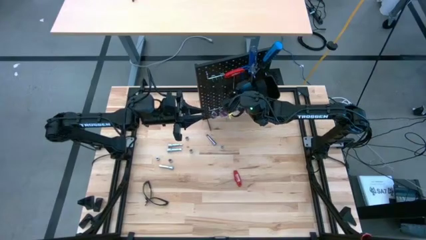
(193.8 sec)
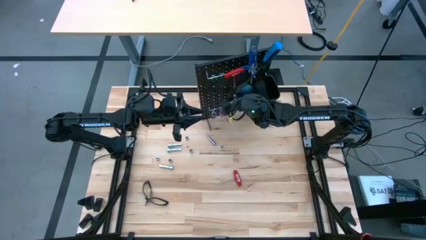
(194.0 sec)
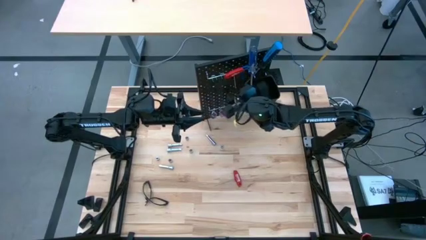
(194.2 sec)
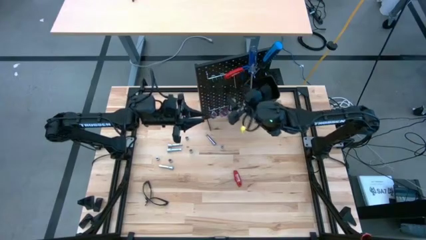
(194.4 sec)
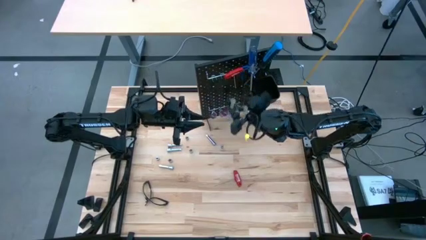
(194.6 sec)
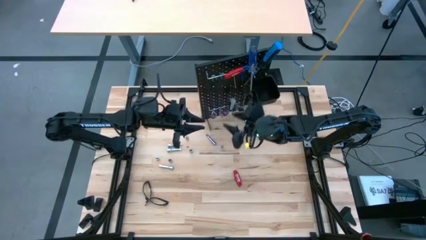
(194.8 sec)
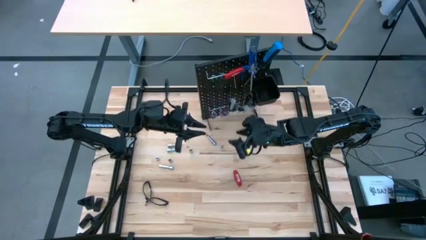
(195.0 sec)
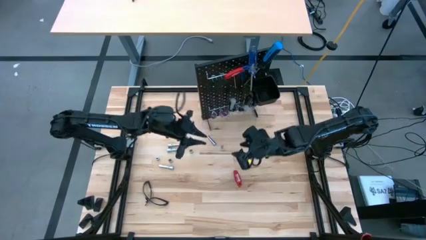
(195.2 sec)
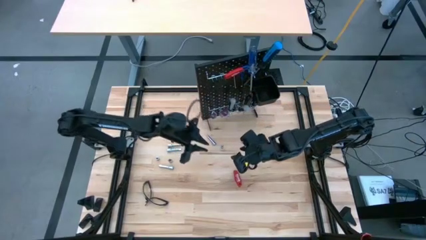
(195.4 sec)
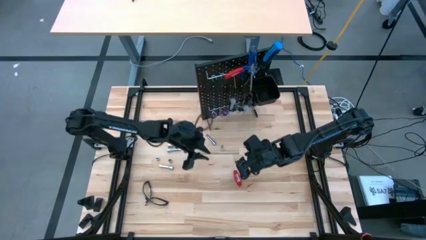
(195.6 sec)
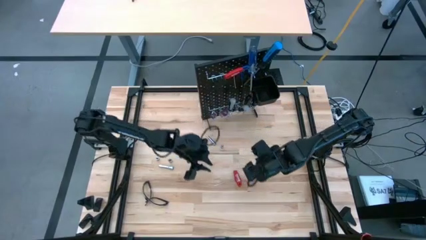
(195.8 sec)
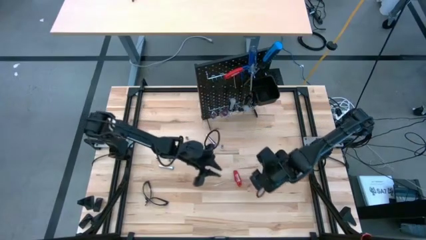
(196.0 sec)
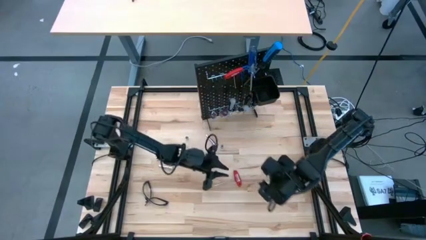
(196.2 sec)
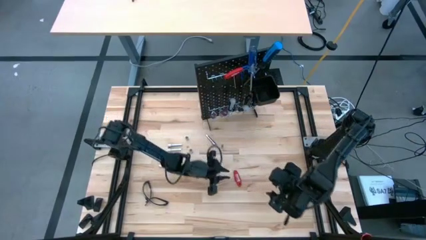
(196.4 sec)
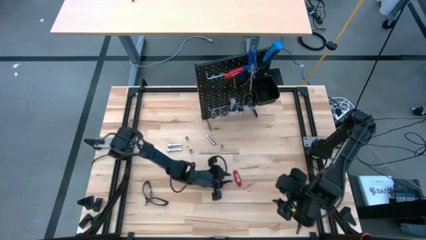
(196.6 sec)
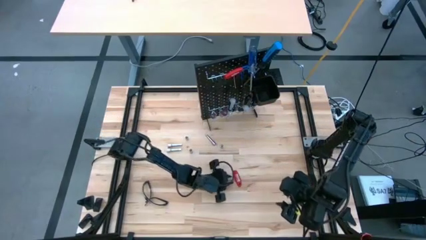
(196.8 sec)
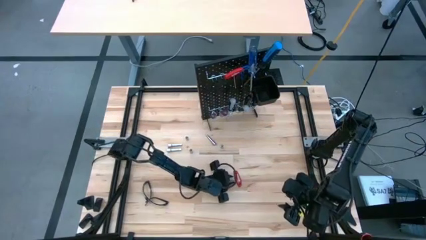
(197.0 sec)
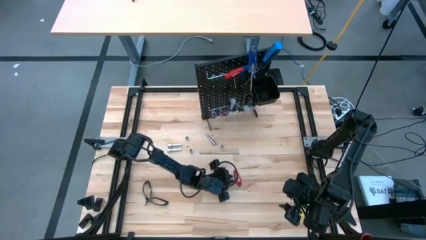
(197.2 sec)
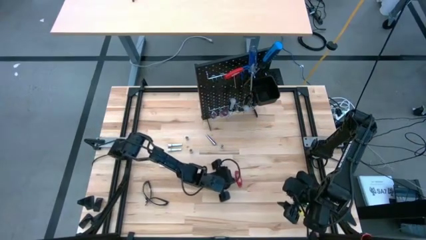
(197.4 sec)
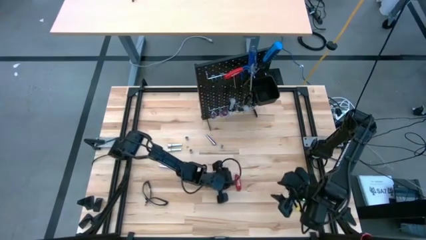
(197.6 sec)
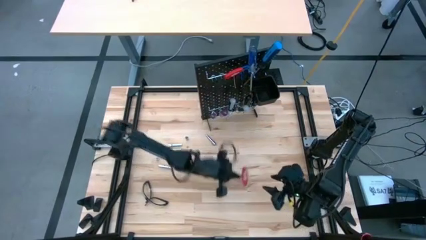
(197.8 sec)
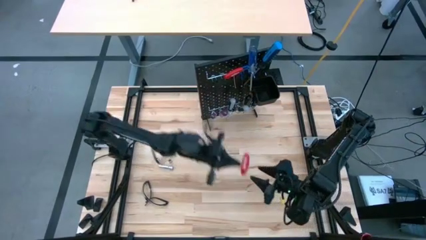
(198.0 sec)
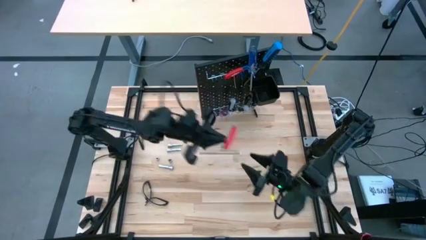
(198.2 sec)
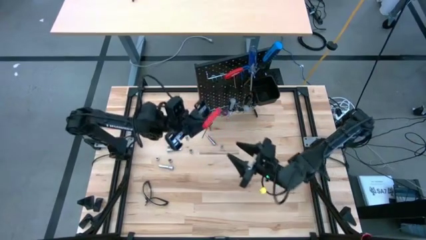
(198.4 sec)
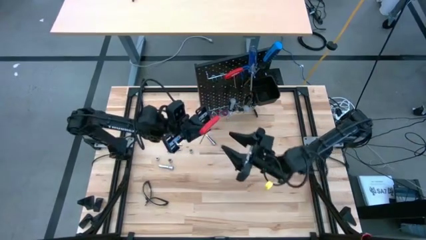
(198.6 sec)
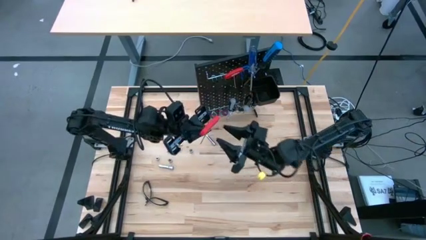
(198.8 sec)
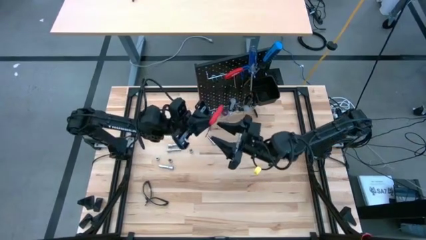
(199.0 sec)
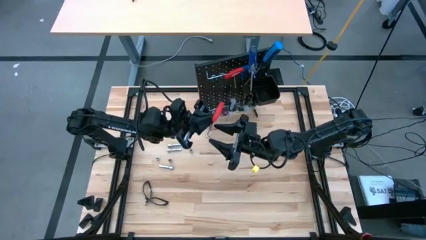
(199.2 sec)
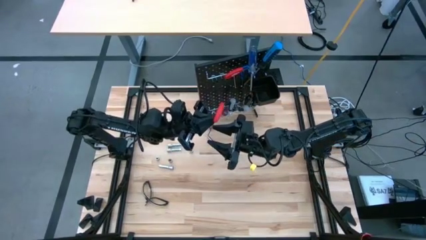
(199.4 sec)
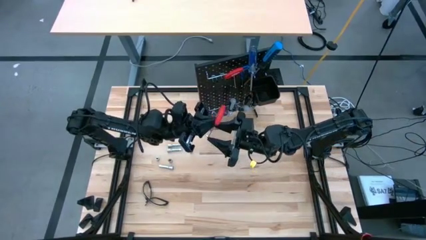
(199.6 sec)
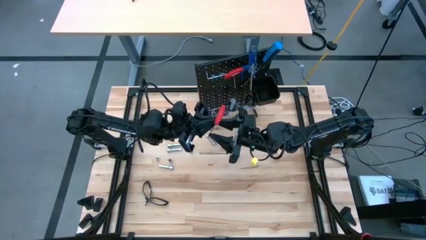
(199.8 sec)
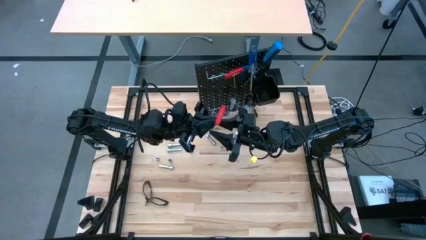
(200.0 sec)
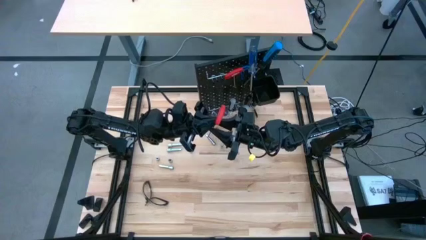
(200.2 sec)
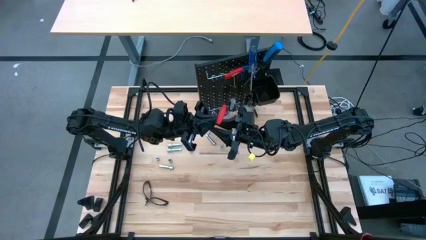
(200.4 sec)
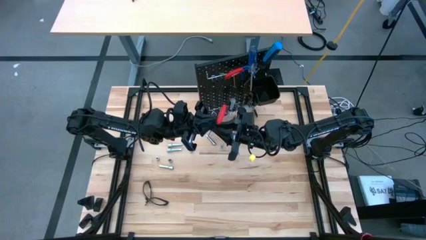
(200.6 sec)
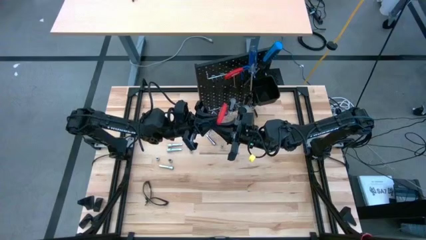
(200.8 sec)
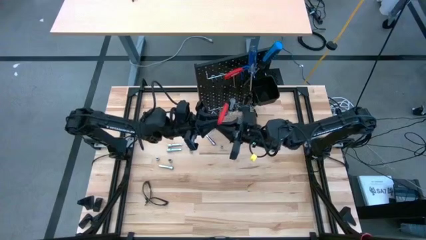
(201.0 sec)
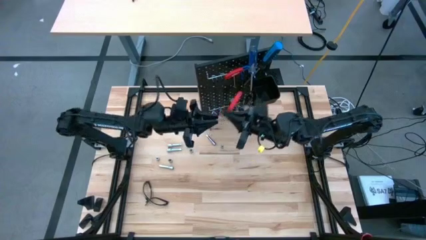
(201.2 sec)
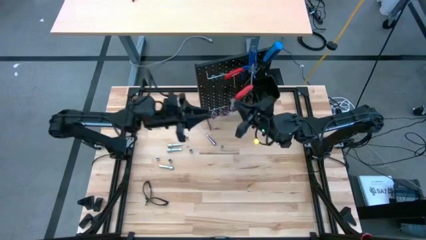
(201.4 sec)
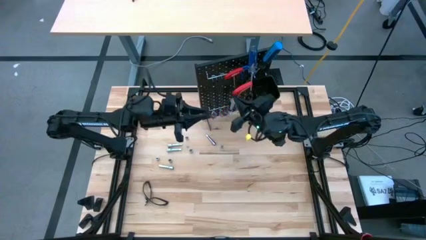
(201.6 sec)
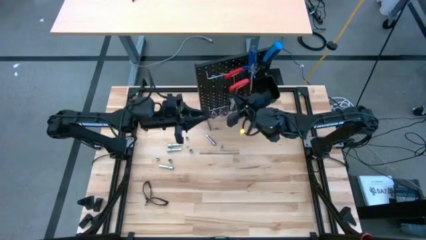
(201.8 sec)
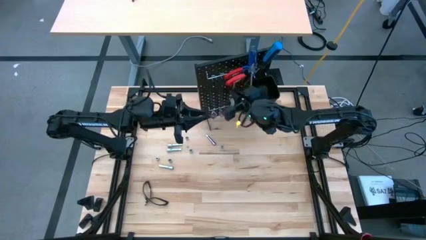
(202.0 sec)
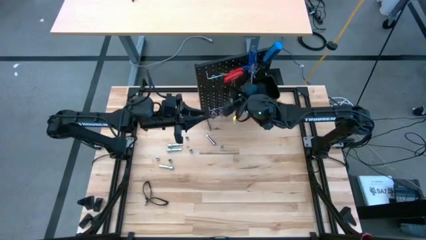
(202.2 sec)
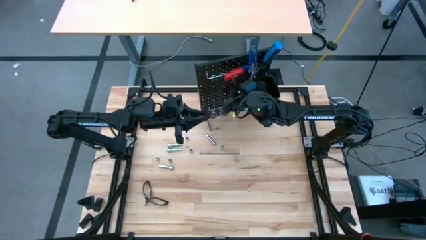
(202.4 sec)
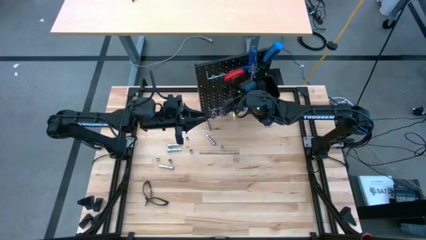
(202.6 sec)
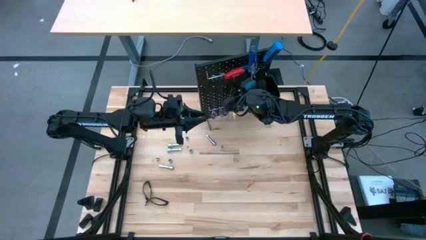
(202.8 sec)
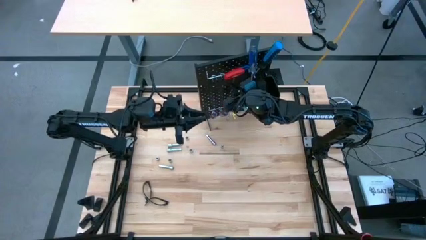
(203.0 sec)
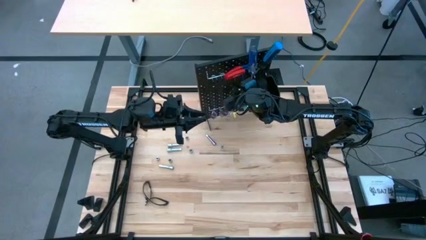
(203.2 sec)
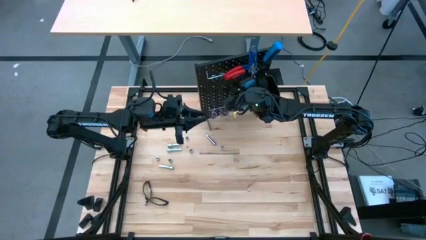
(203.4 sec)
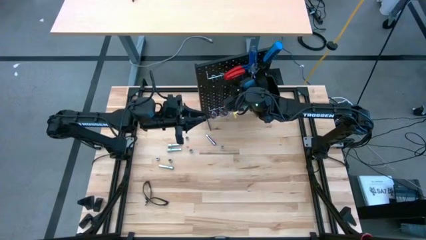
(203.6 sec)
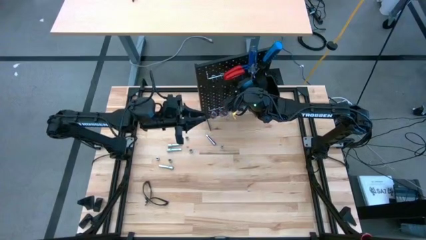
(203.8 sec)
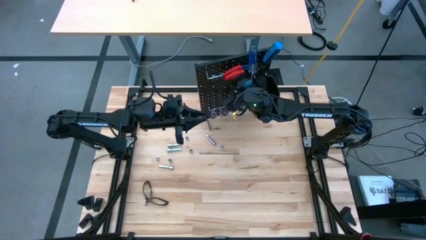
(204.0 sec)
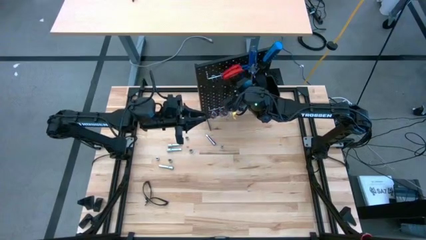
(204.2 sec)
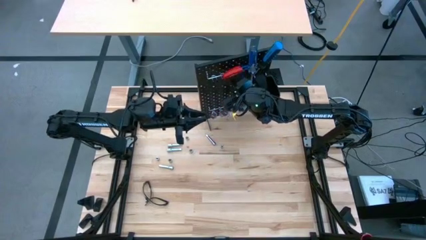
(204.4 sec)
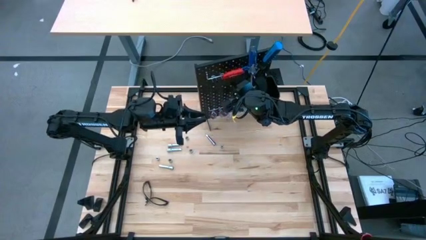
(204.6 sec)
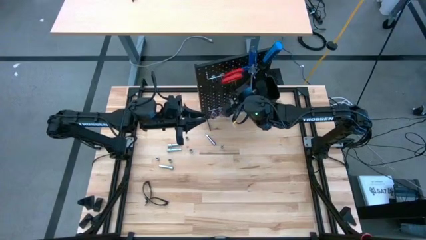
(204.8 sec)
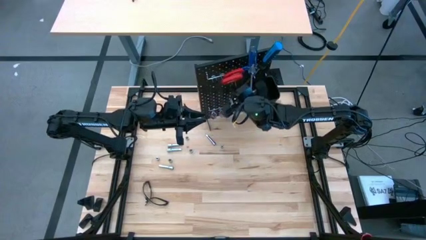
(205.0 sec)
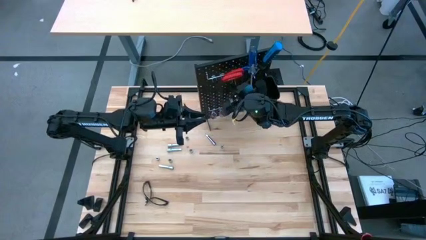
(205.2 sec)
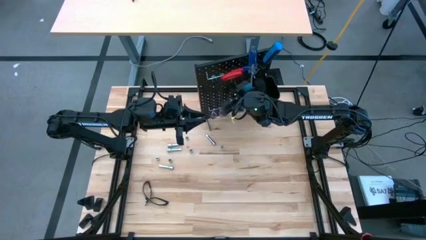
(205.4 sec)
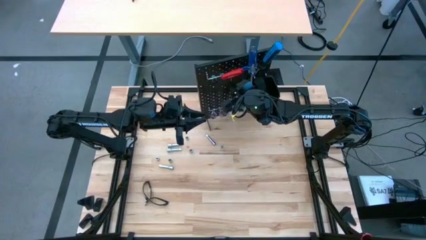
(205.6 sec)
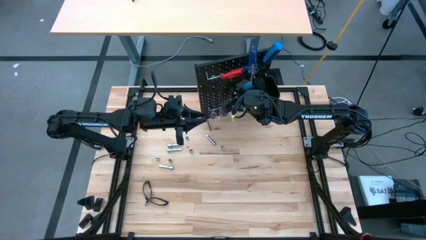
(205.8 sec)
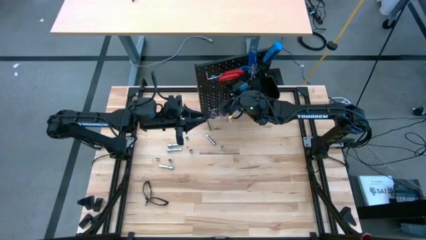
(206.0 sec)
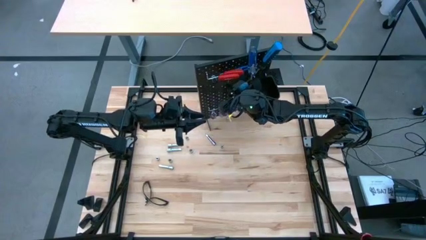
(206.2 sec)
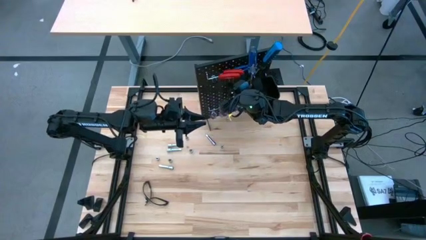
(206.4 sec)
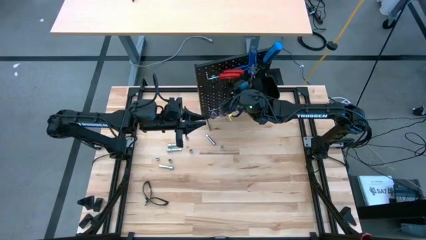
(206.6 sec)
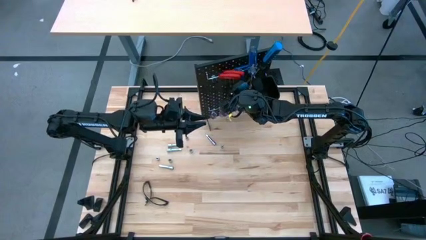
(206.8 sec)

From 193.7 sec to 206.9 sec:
Task: Hang tools onto peg board
Hang the red allen wrench on the pegboard

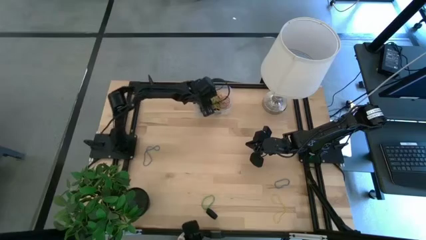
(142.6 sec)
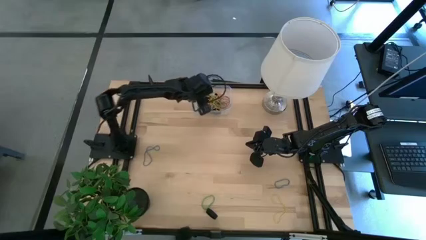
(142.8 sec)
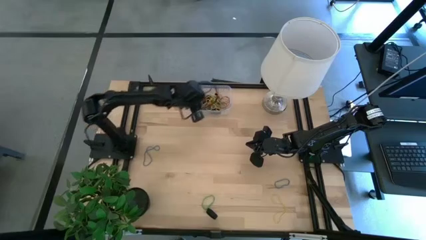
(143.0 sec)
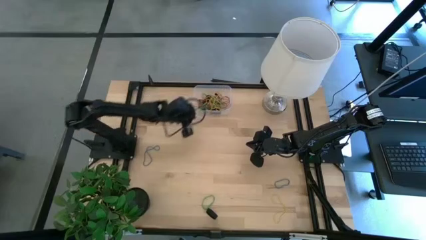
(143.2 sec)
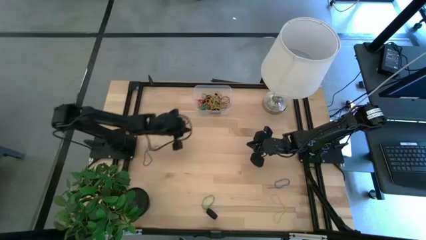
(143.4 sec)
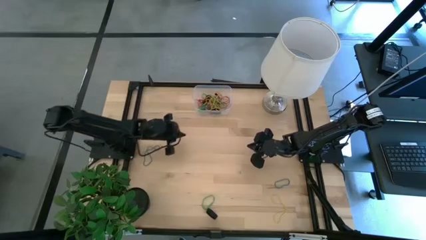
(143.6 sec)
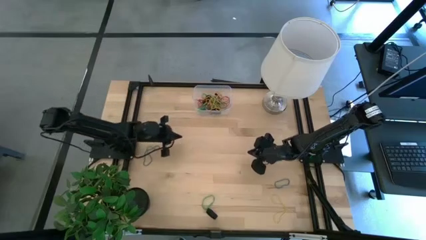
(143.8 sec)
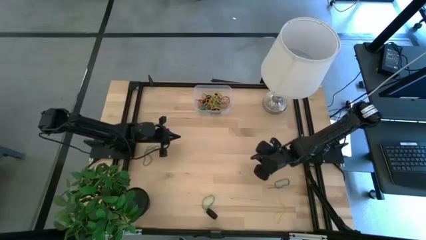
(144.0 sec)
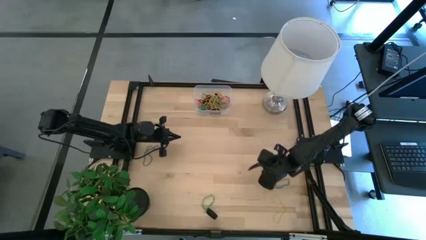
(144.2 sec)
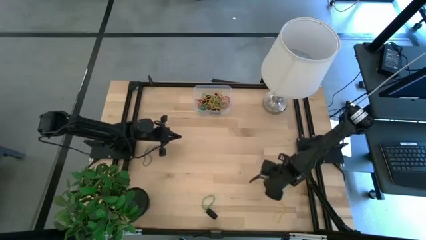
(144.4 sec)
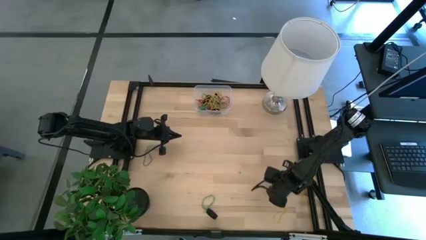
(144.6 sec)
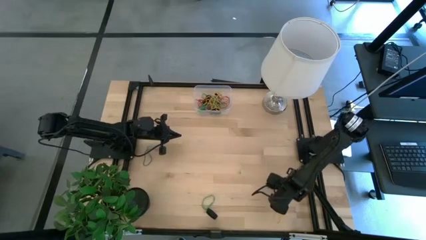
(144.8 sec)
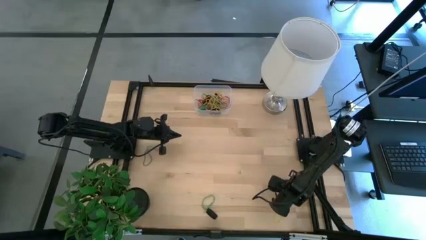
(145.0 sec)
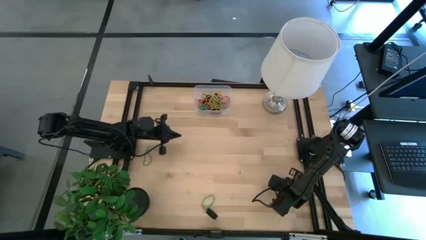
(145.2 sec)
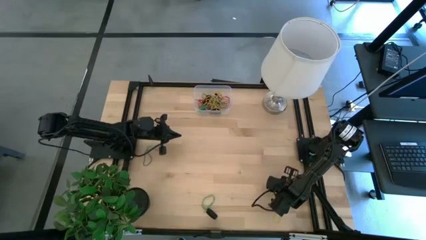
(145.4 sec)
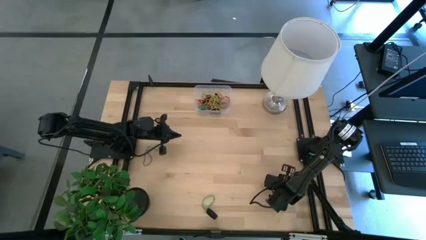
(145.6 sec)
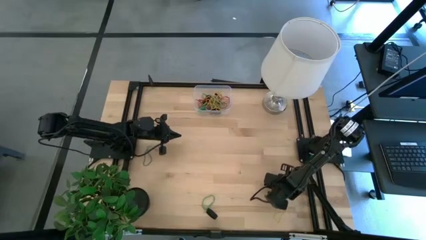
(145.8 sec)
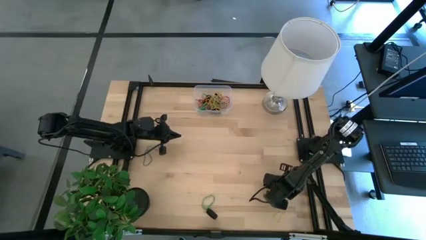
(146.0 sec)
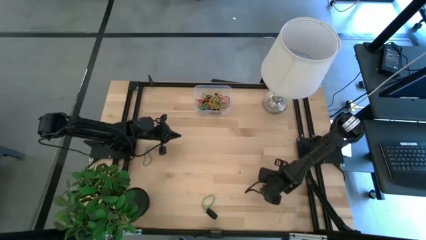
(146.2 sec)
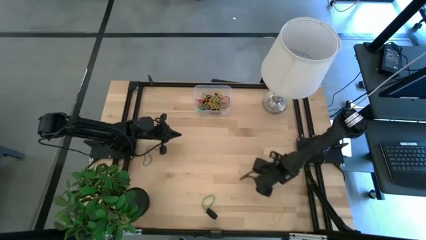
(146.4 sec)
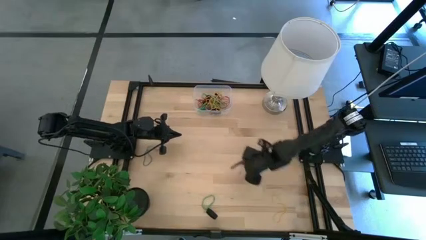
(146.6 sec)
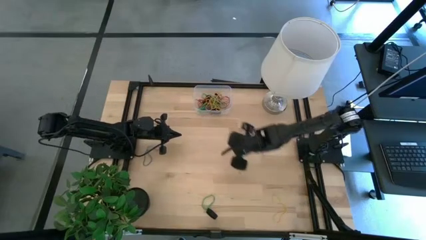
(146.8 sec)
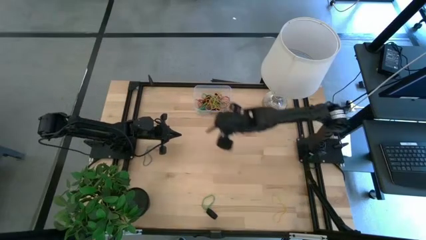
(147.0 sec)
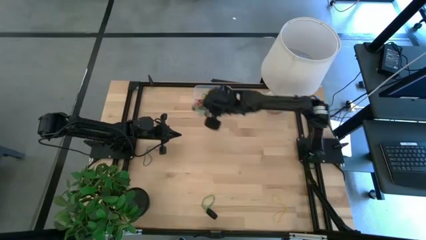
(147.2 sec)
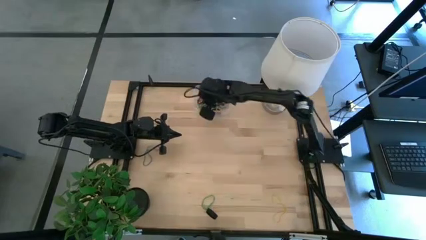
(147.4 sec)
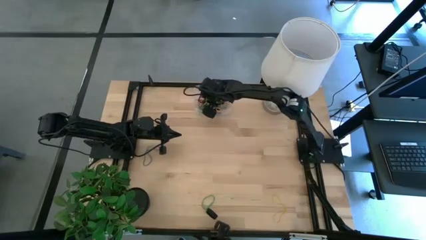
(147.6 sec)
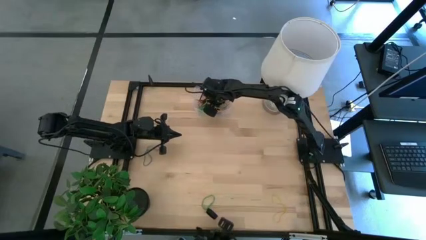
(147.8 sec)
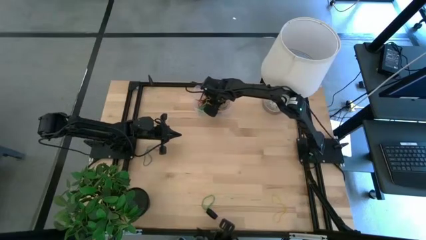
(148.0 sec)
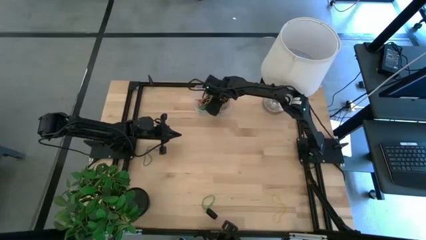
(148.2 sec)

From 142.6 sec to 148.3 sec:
Task: Pick and place rubber bands into bin
Put the blue rubber band into the transparent bin
